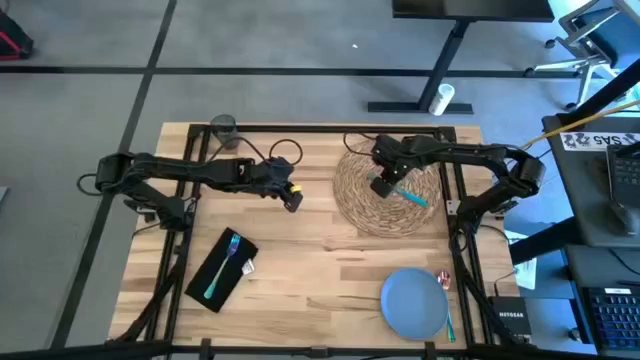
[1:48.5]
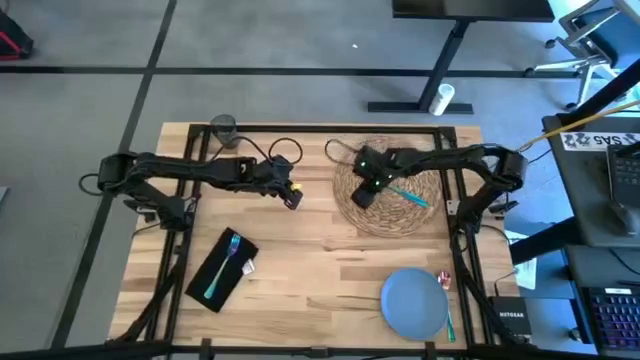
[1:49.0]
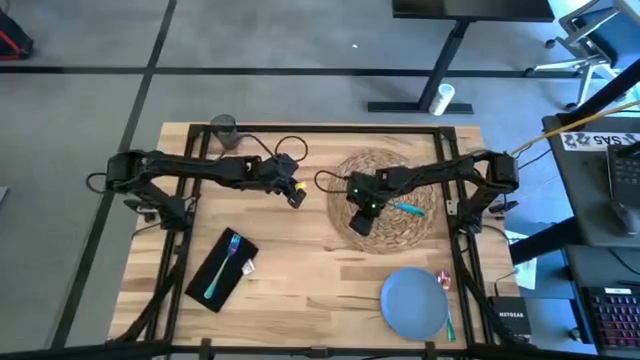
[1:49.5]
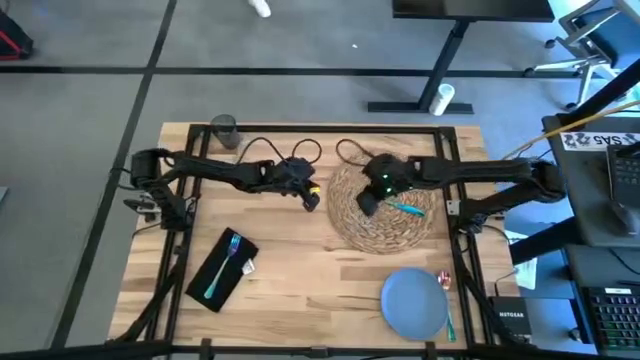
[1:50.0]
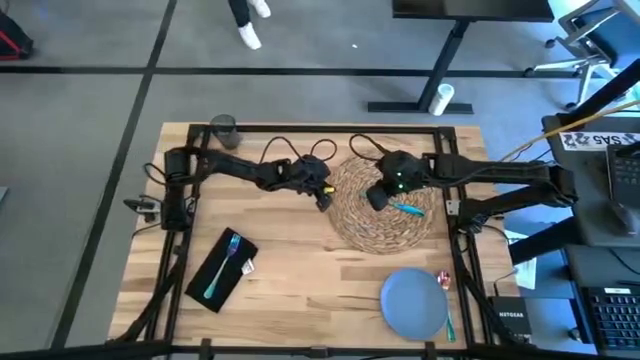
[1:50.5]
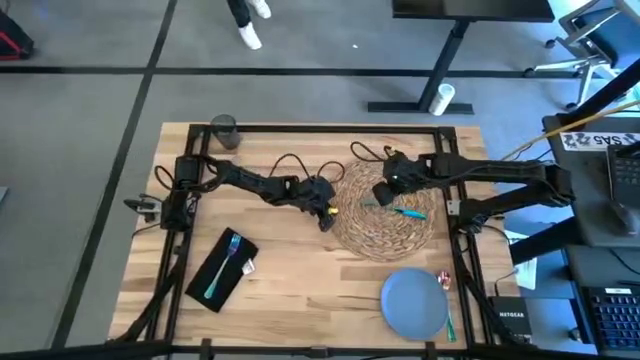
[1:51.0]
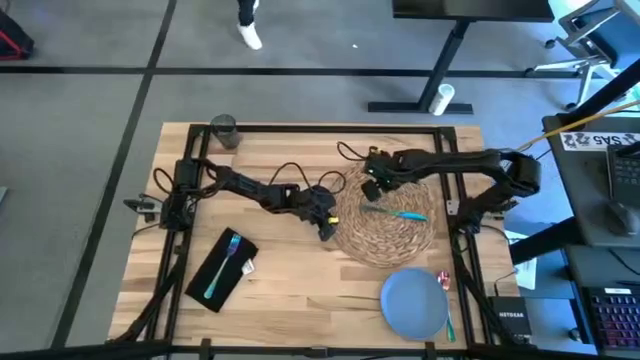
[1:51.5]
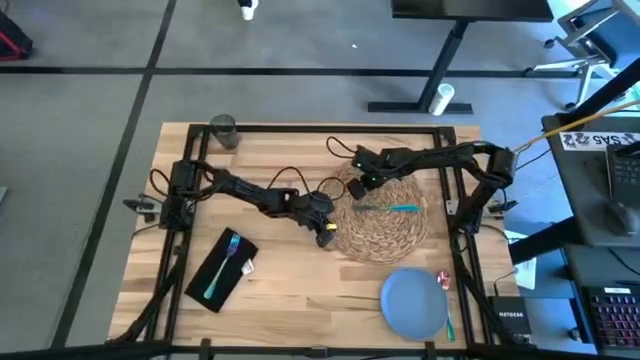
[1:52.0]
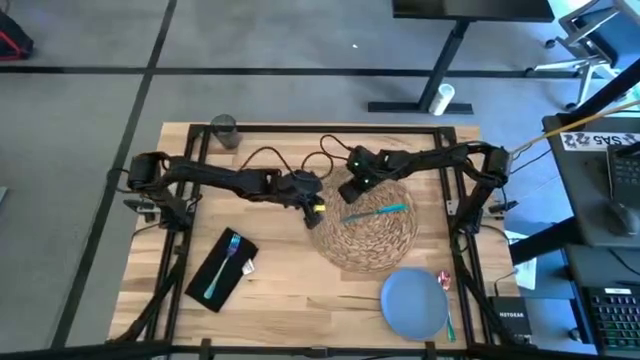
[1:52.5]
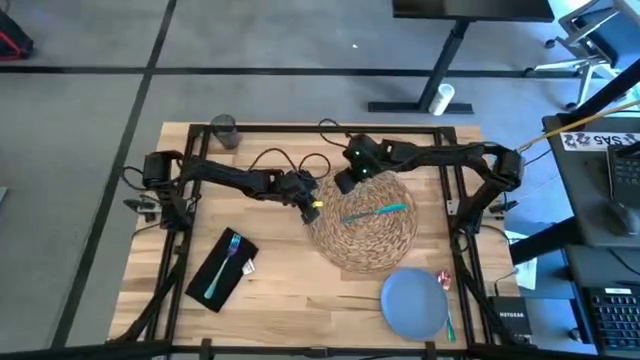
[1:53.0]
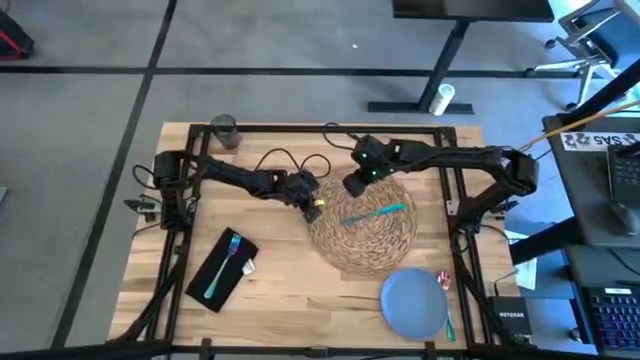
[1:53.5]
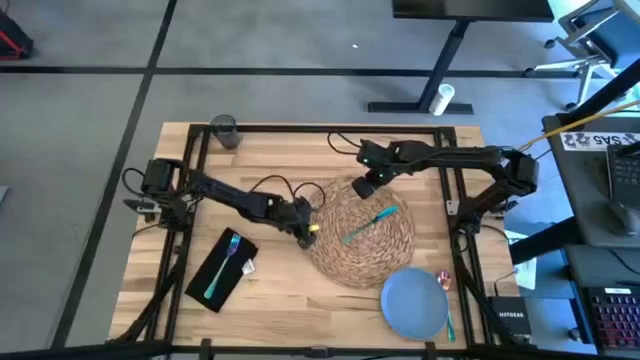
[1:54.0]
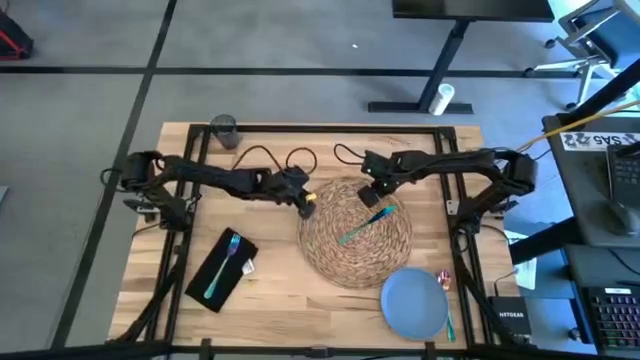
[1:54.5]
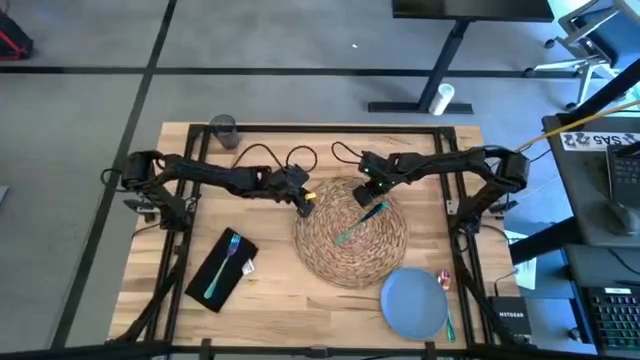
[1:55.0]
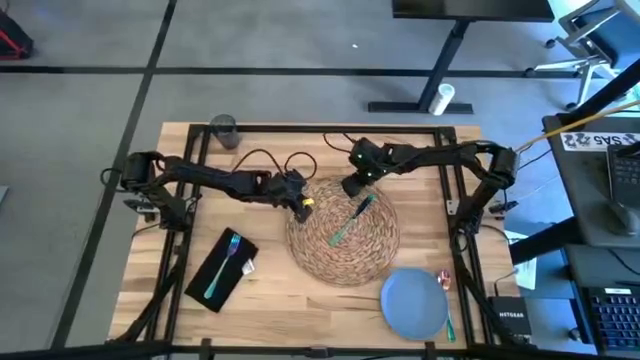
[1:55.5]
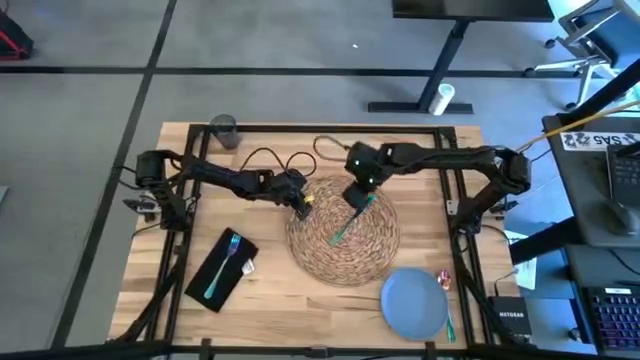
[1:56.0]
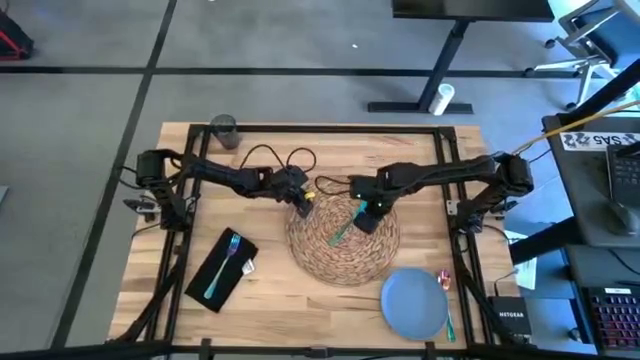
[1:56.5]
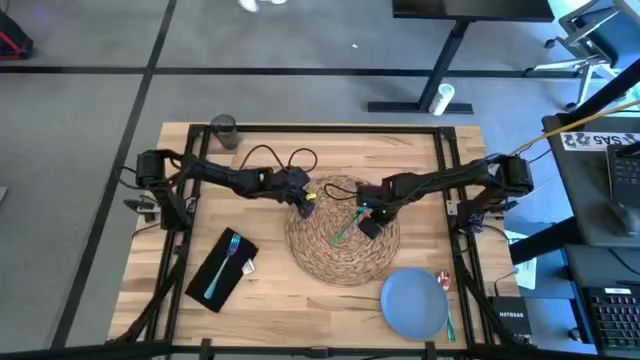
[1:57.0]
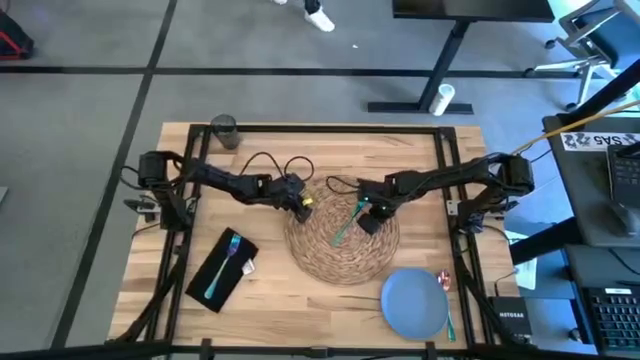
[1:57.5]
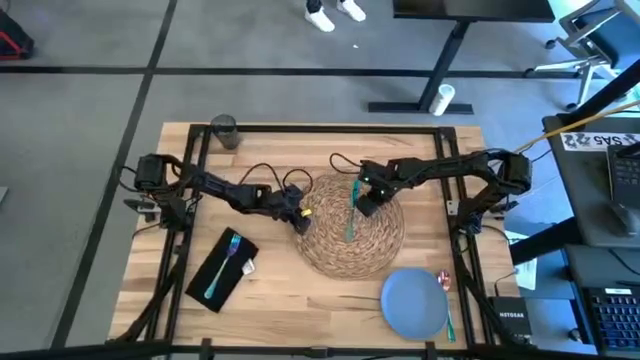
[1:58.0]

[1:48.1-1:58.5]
Task: Set table place
Move the brown placemat to the center of the table

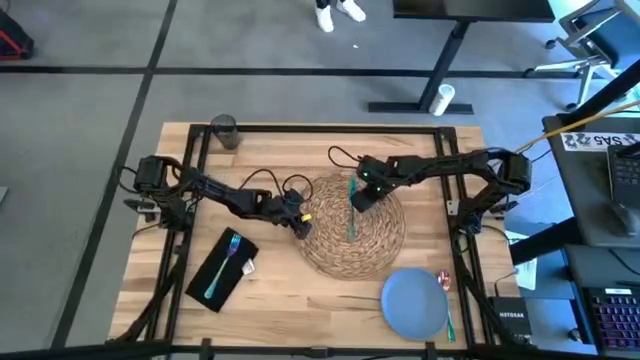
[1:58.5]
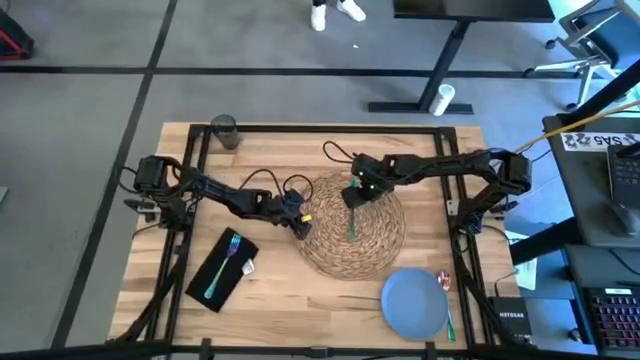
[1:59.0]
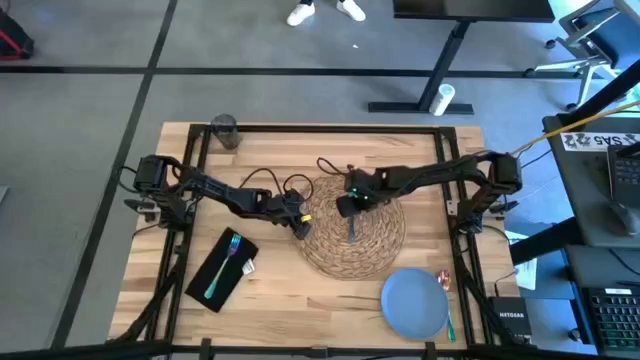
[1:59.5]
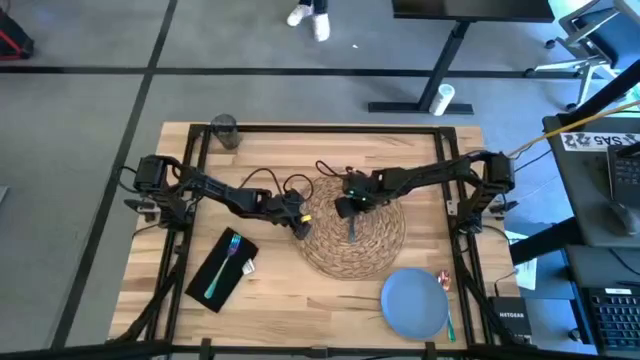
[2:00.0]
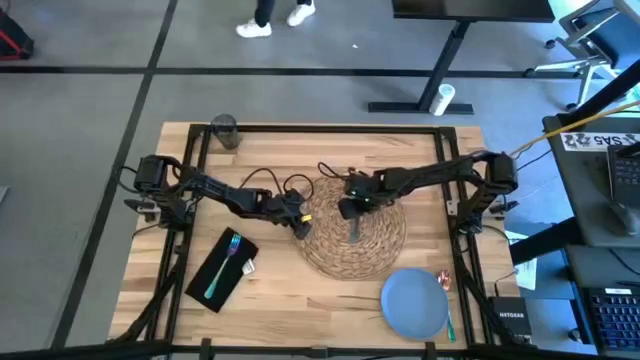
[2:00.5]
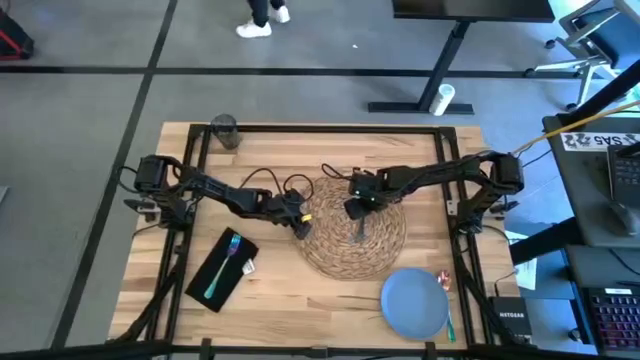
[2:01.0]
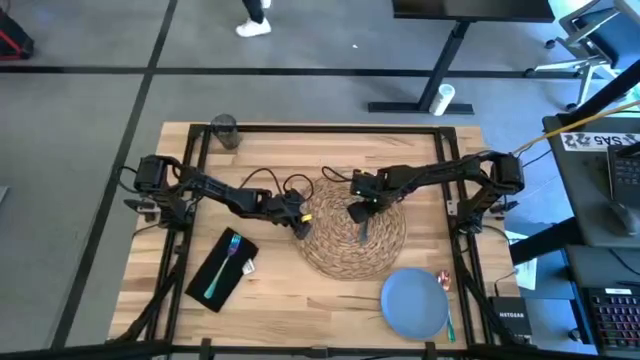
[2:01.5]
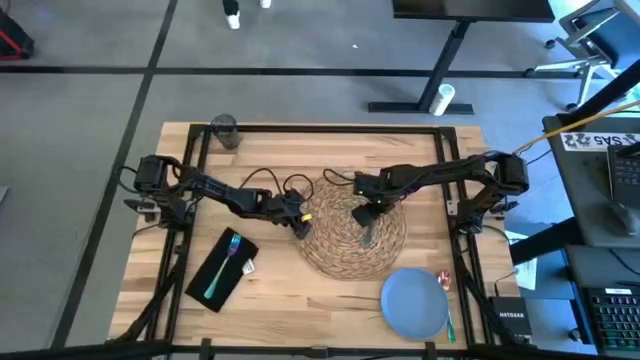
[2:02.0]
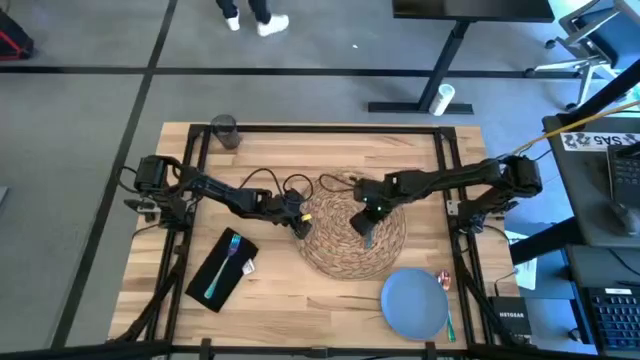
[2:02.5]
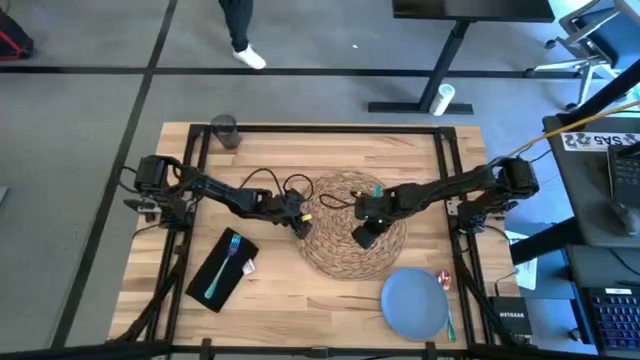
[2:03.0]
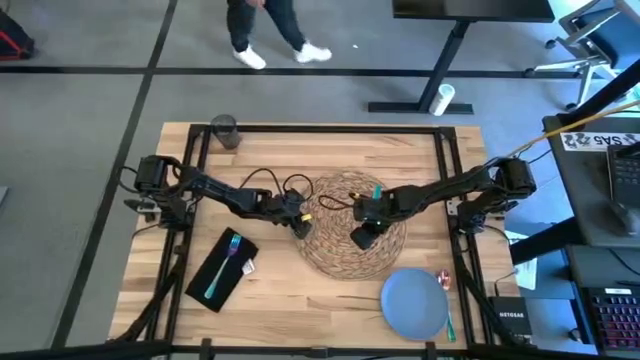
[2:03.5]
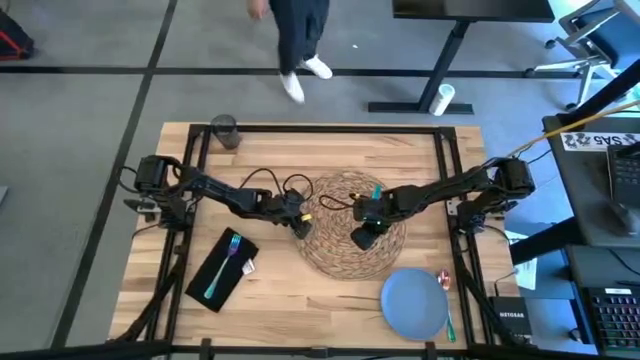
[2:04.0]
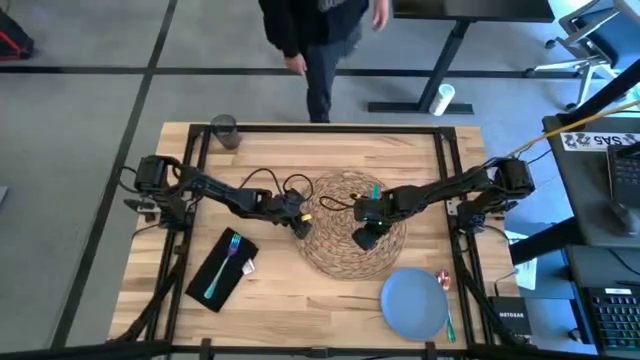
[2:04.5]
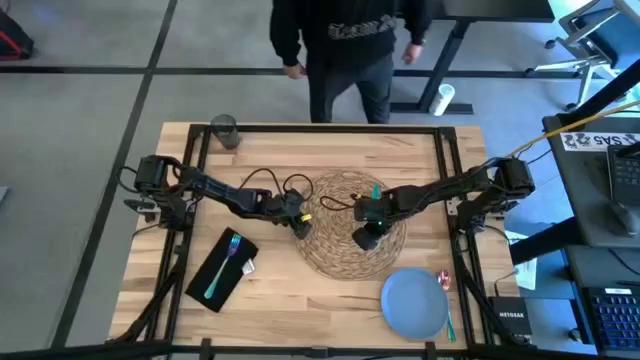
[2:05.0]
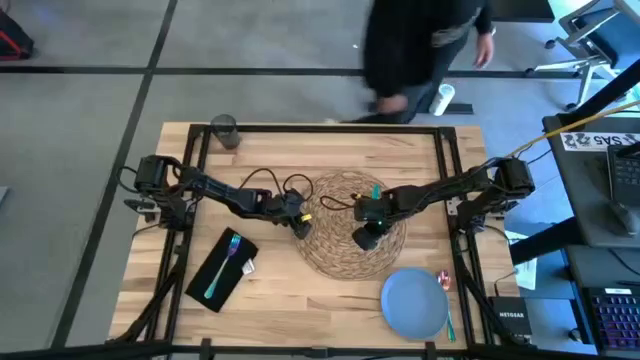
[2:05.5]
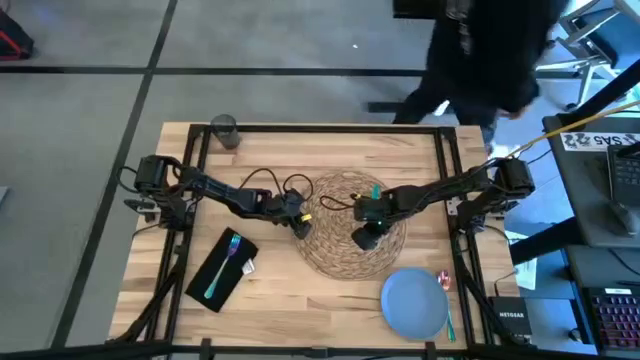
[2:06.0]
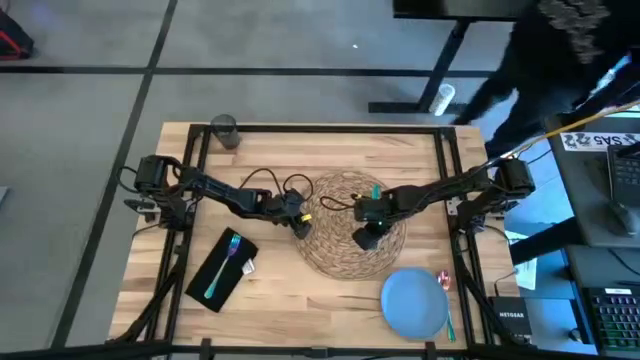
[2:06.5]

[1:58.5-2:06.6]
Adjust the blue table knife on the brown placemat

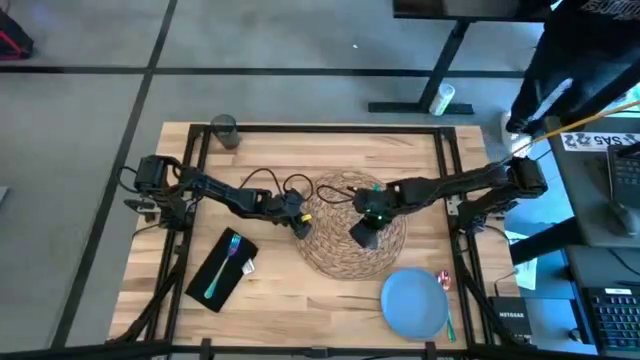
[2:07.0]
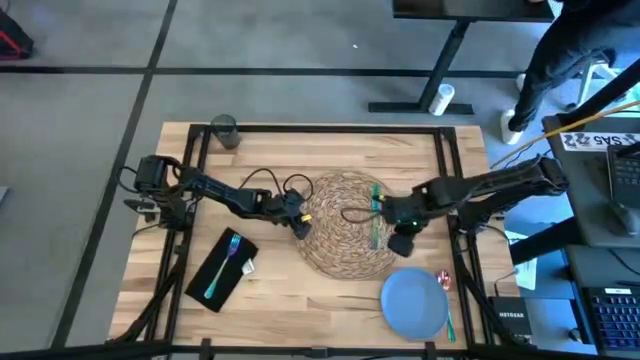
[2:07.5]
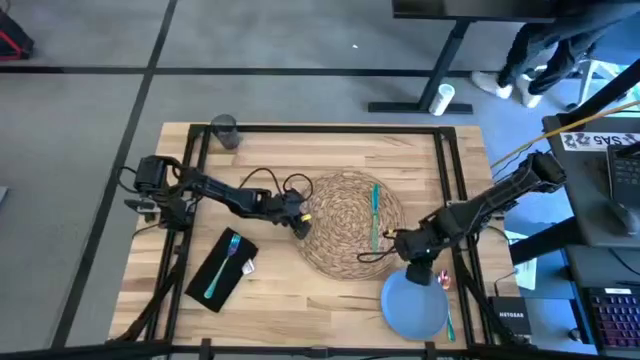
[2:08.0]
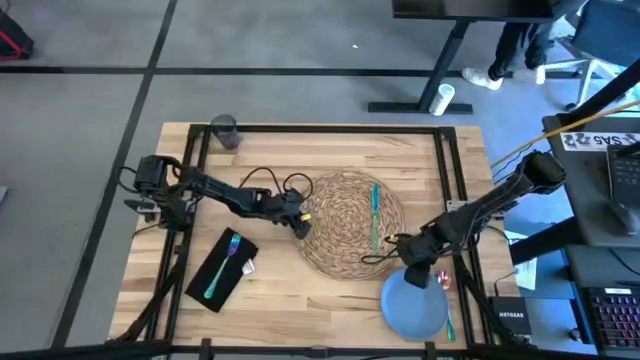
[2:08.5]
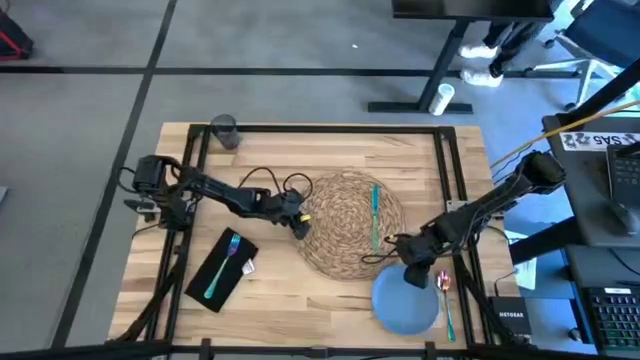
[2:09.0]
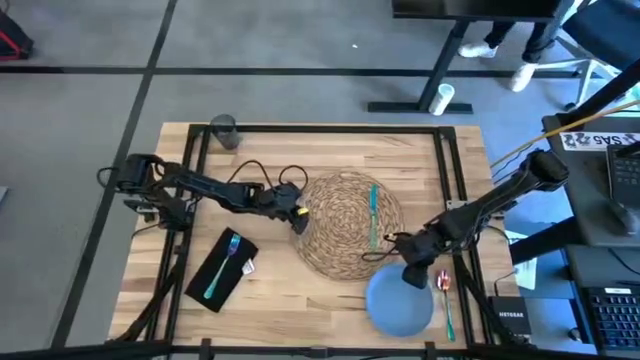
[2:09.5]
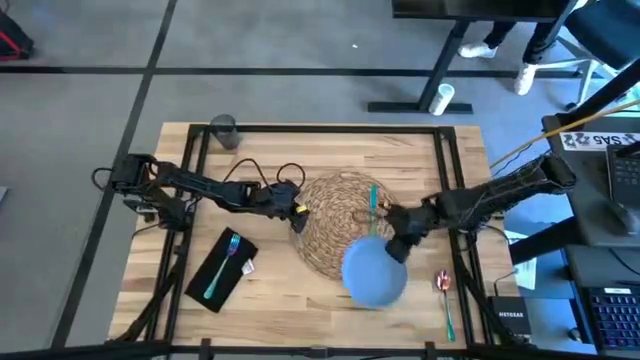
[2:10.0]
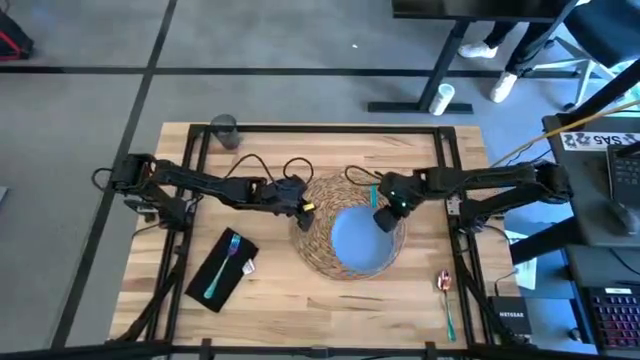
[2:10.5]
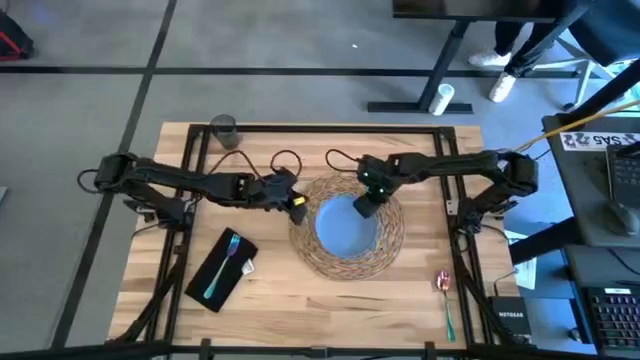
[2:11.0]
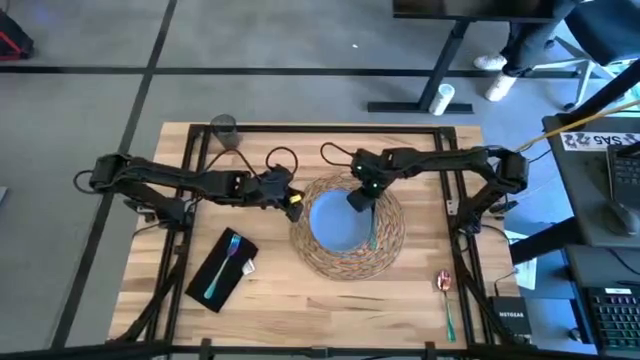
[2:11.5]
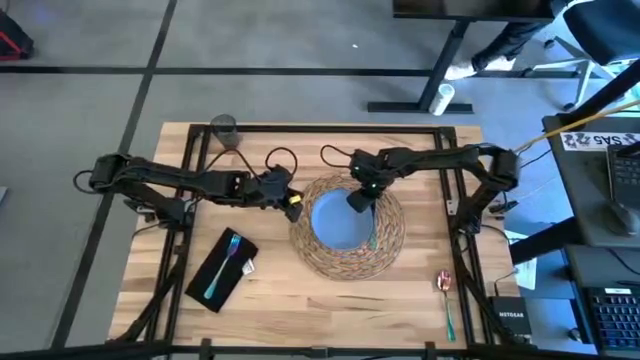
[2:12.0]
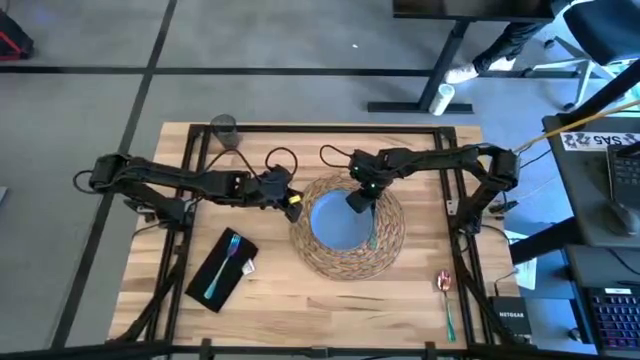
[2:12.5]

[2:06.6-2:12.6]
Put the blue plate on the brown placemat
